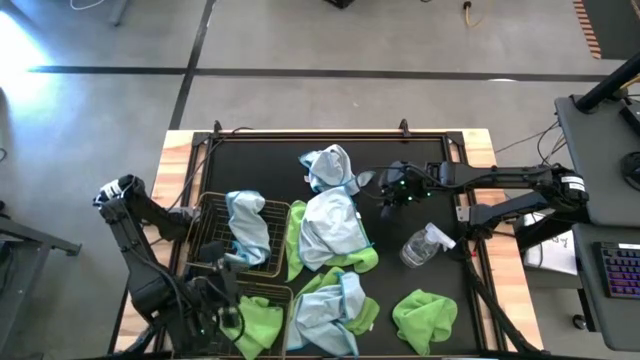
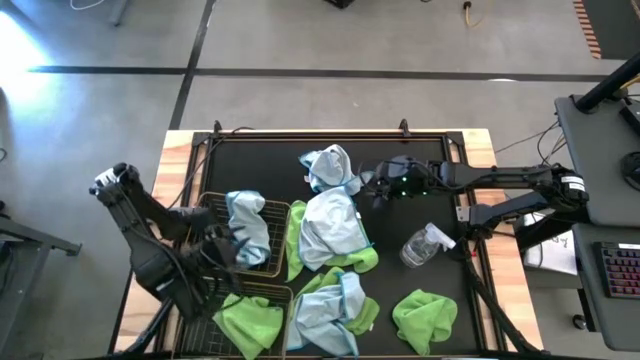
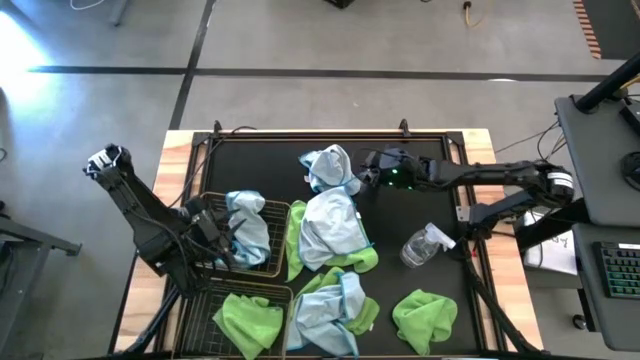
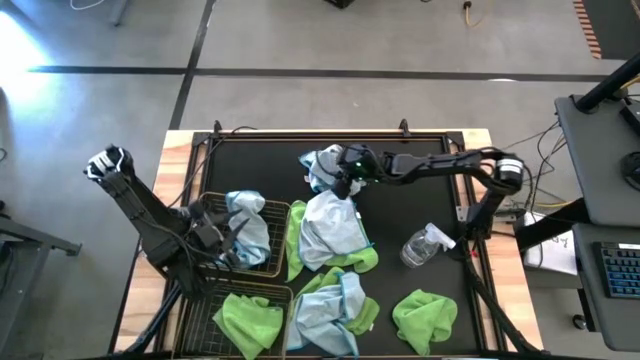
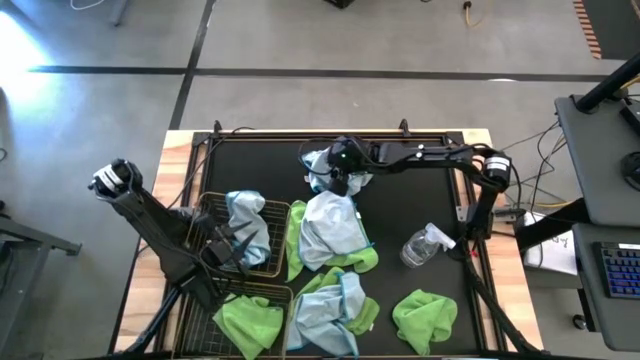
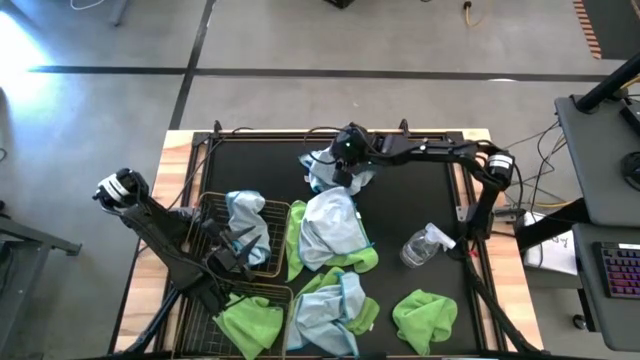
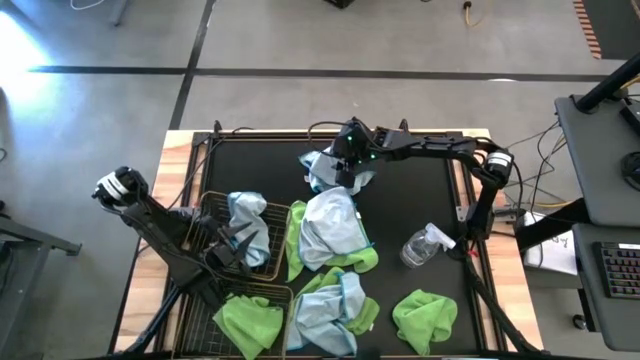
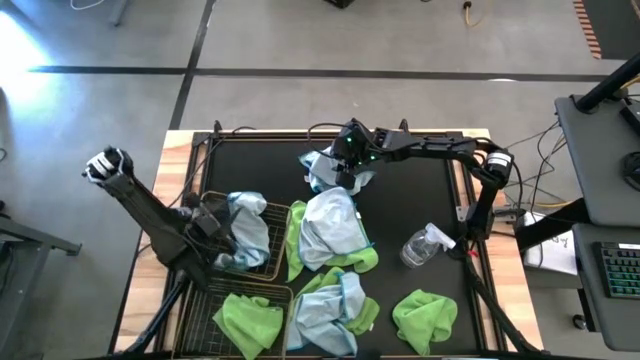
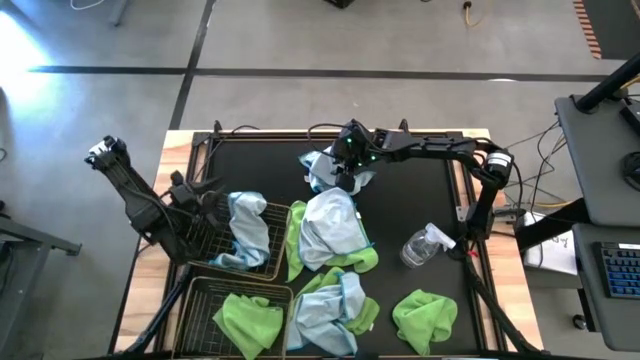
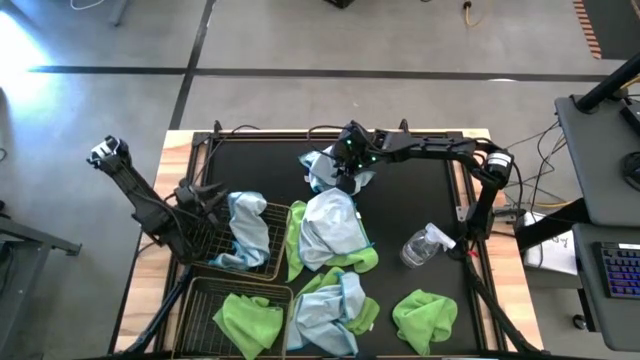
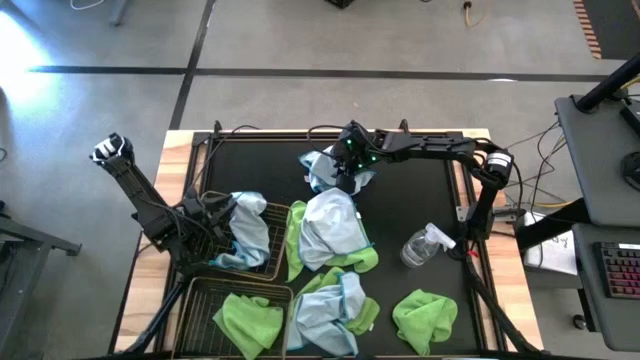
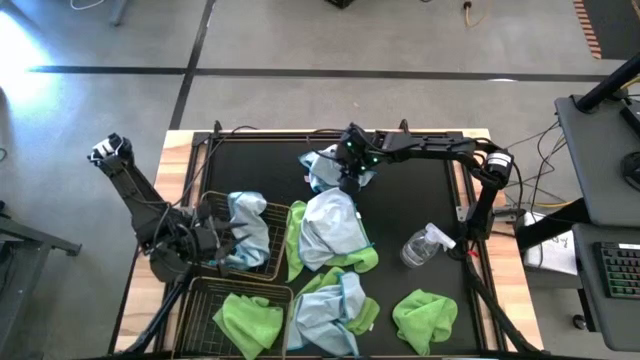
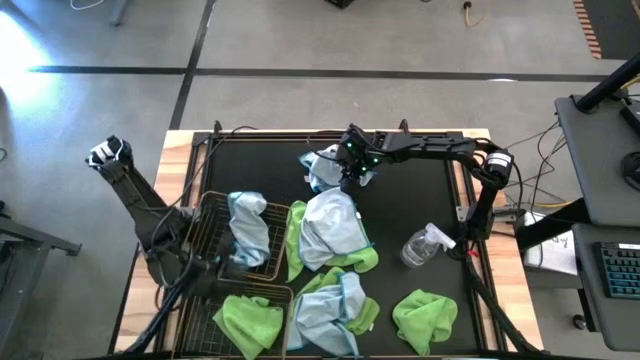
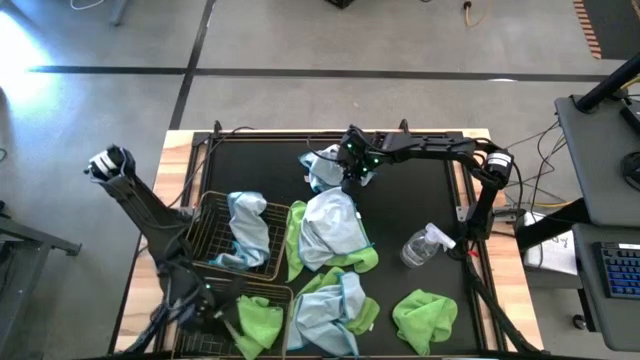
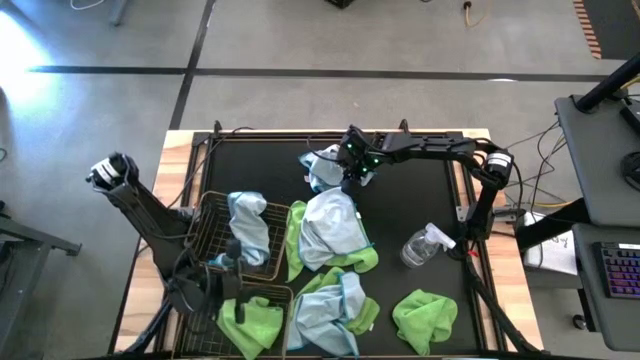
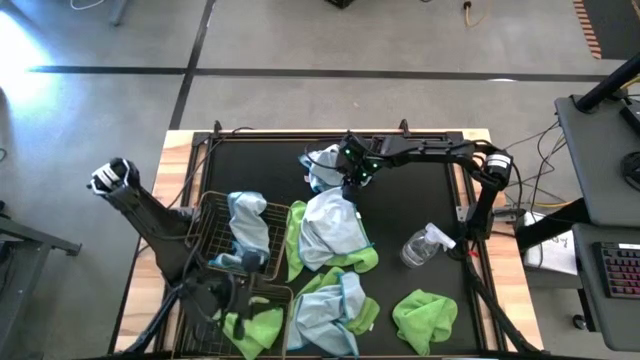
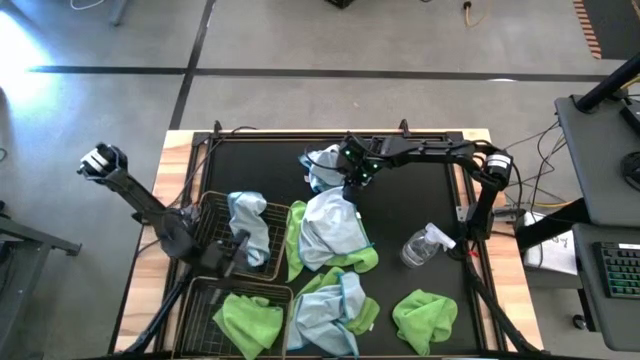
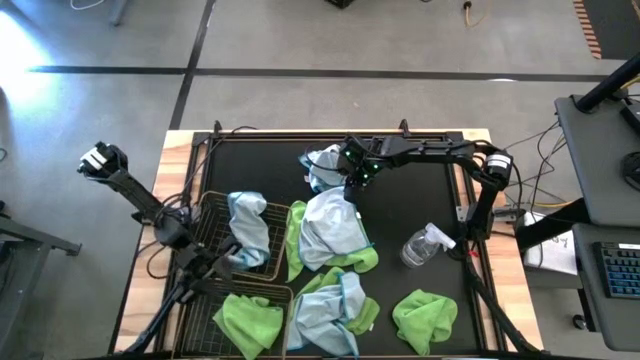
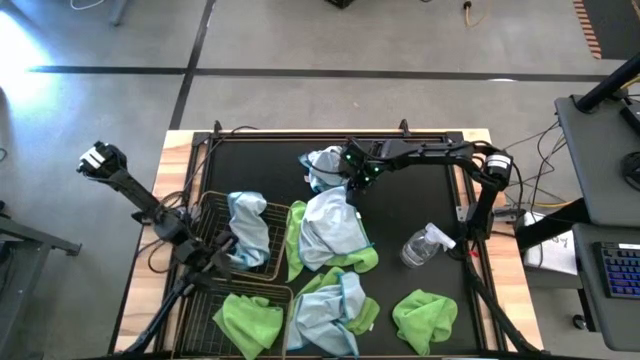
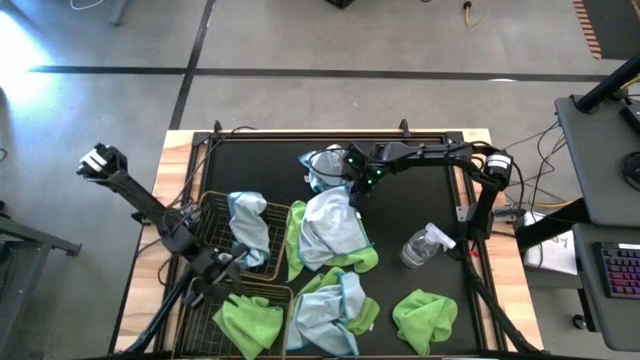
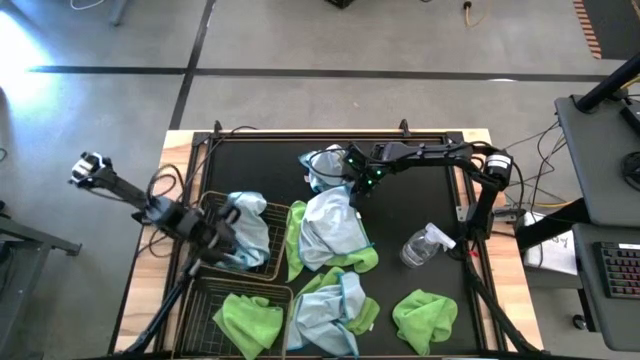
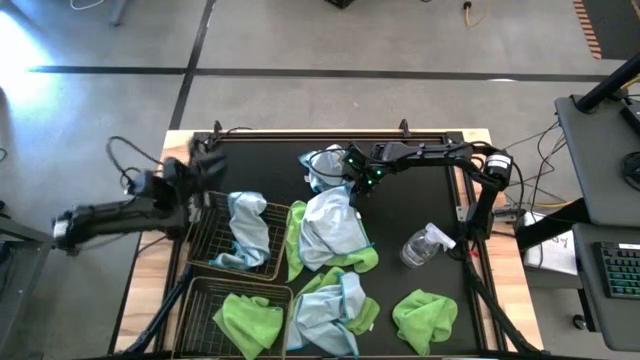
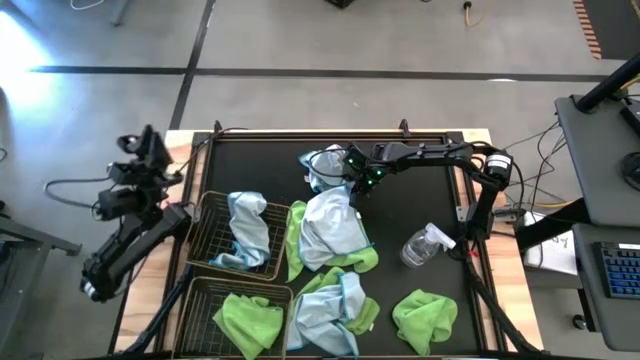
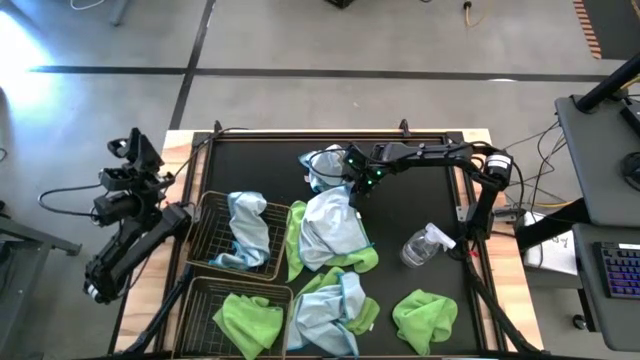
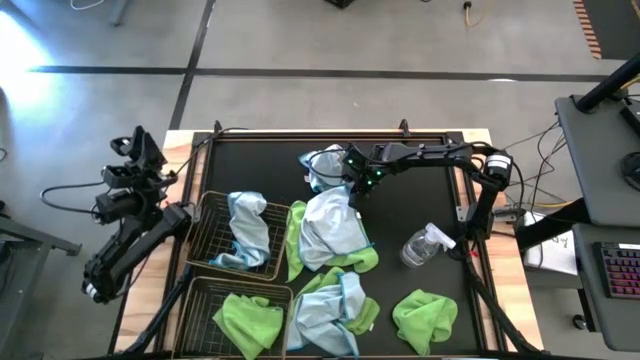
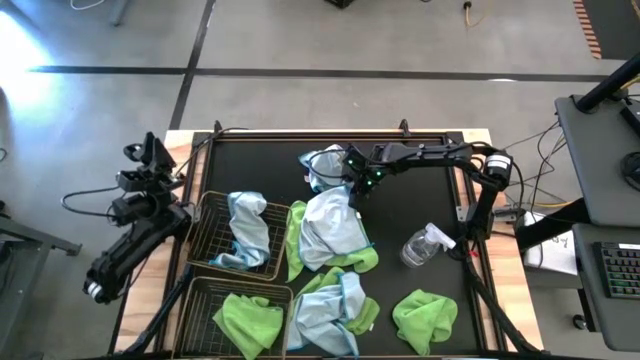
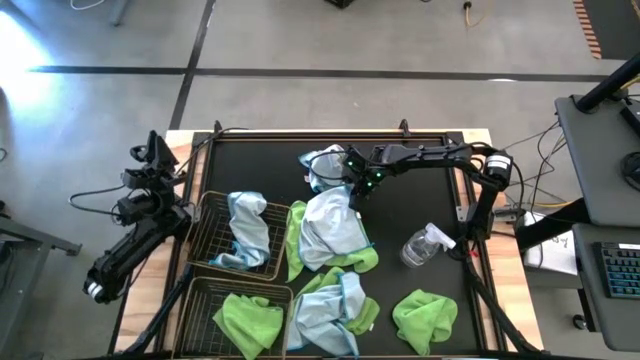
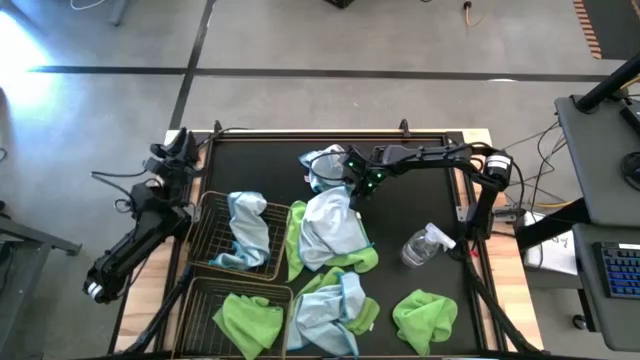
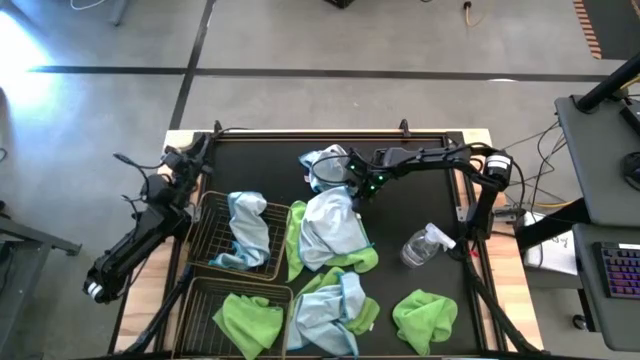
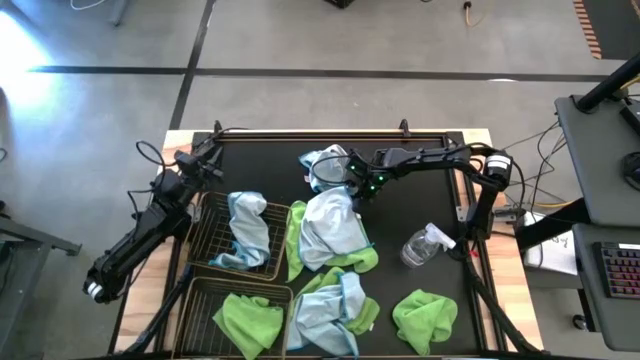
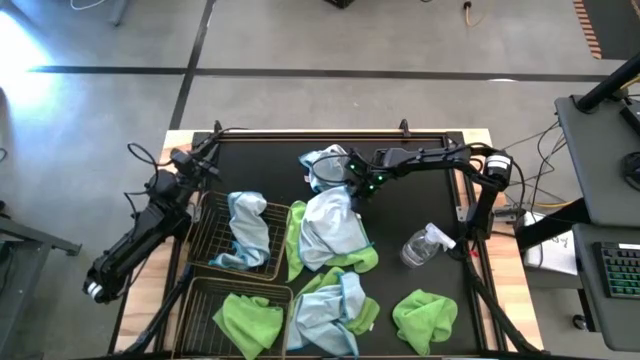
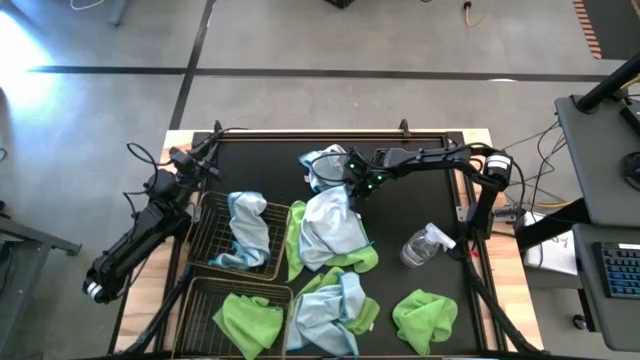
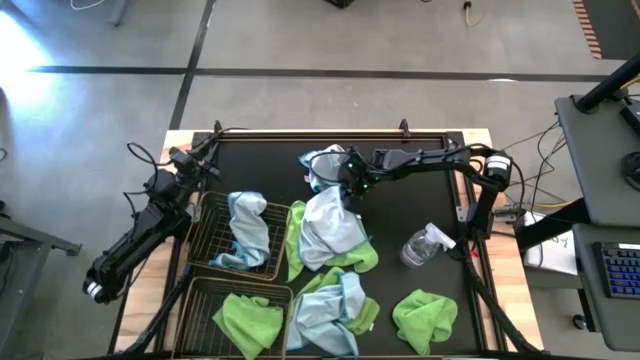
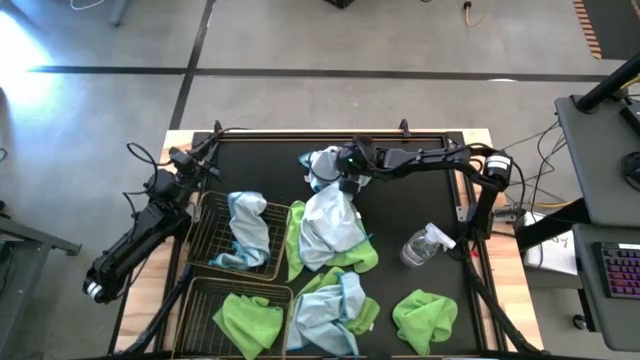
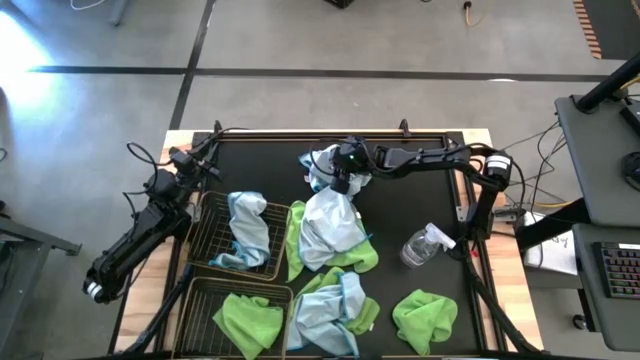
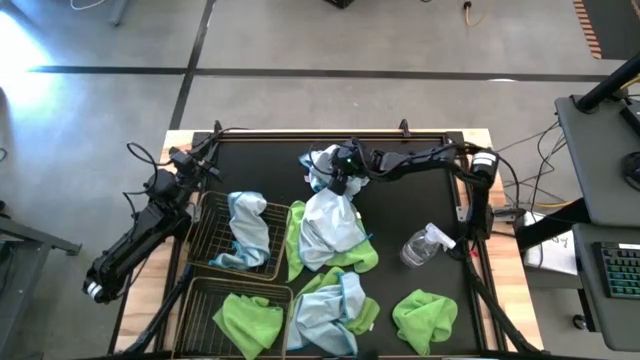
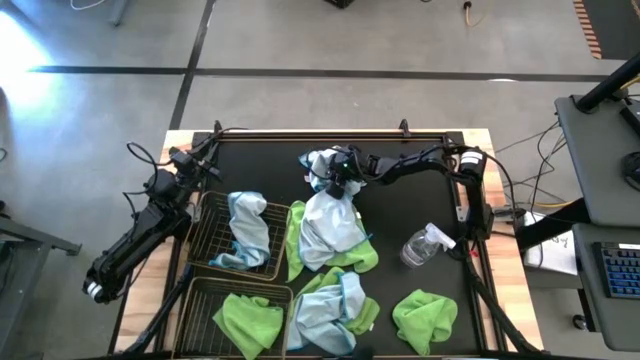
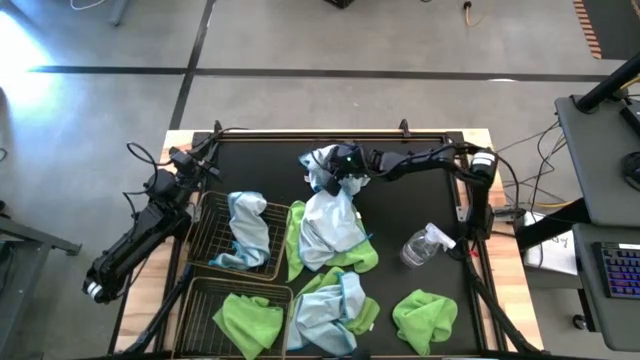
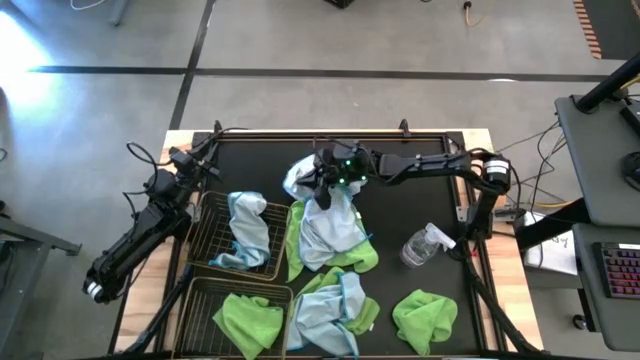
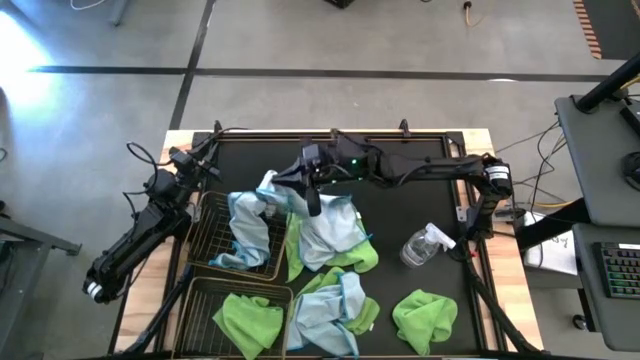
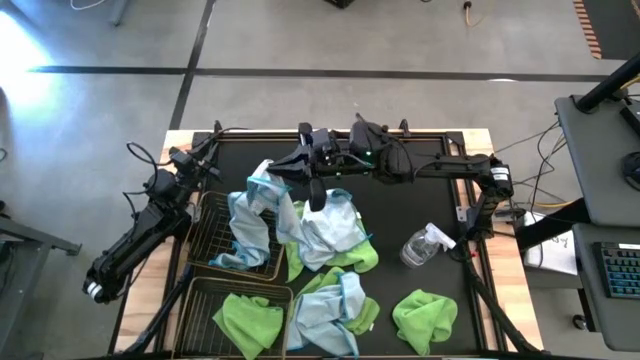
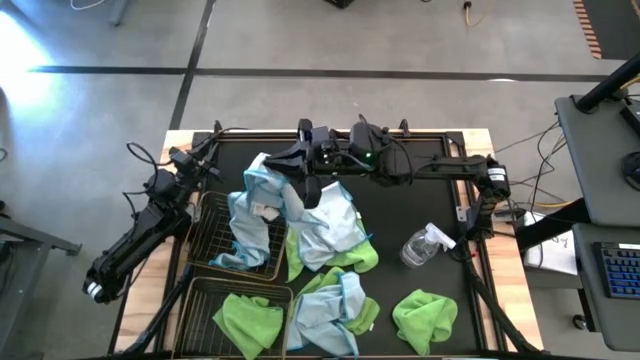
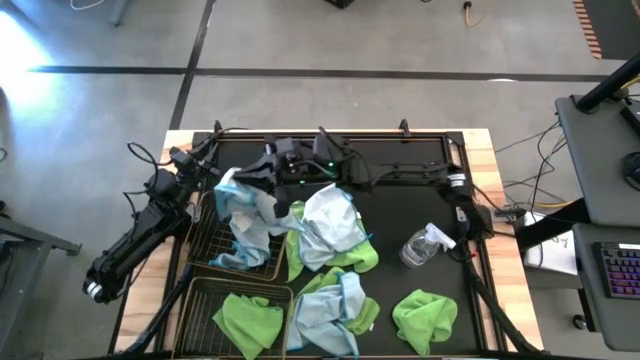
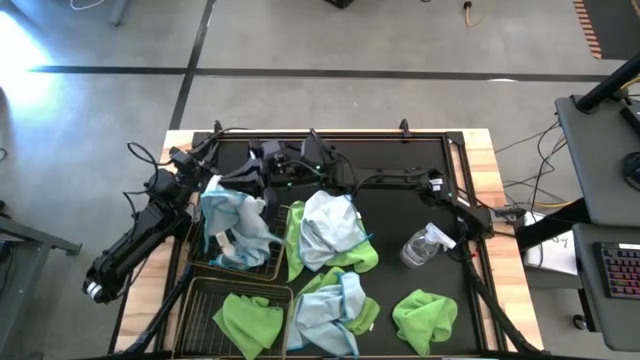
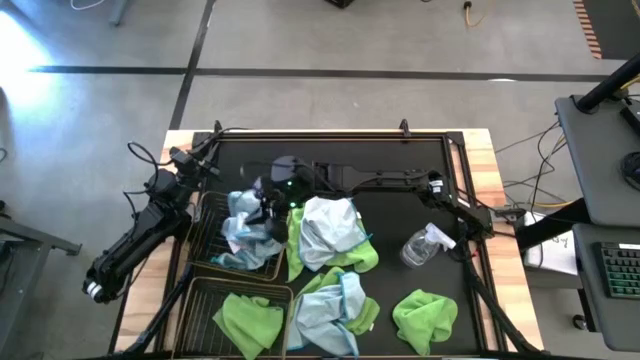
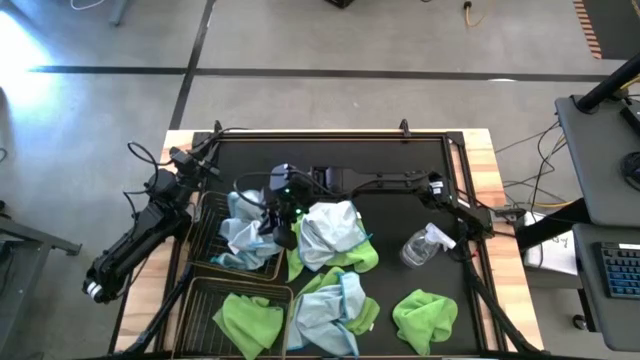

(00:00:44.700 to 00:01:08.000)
Task: Sort microfiber towel by color & place in baskets
Put the top center light blue towel into the top wire basket
